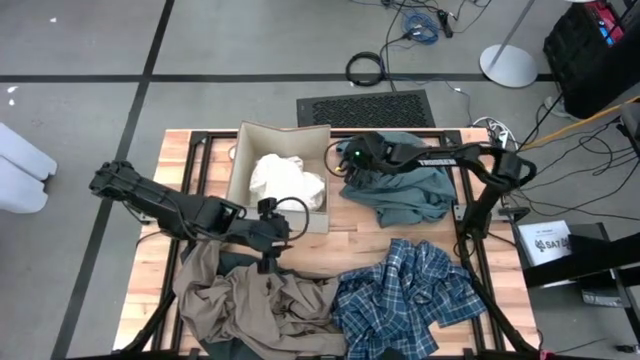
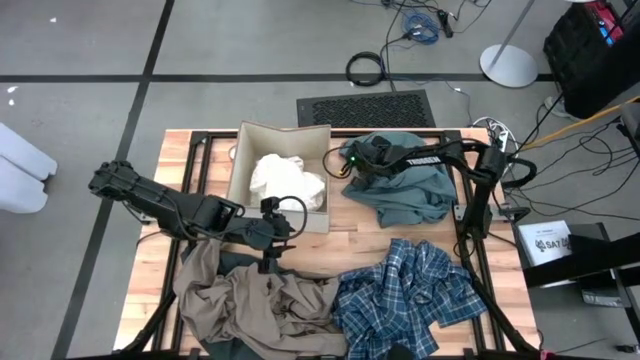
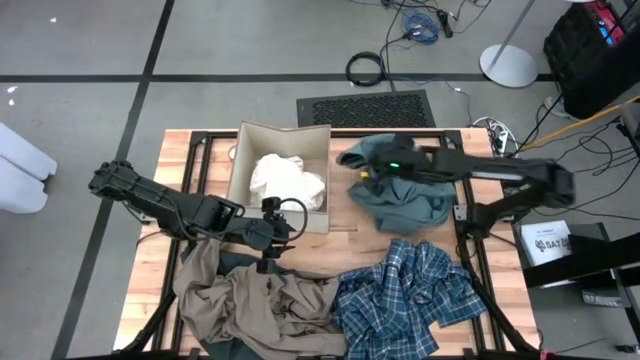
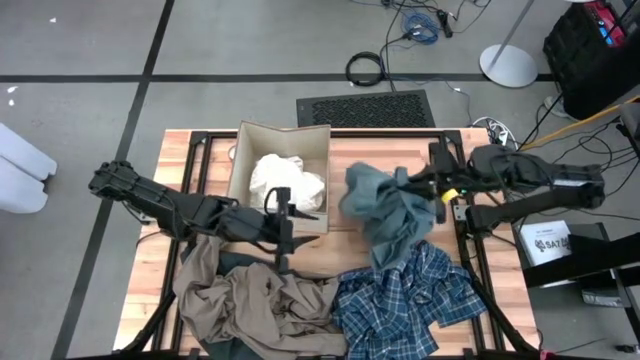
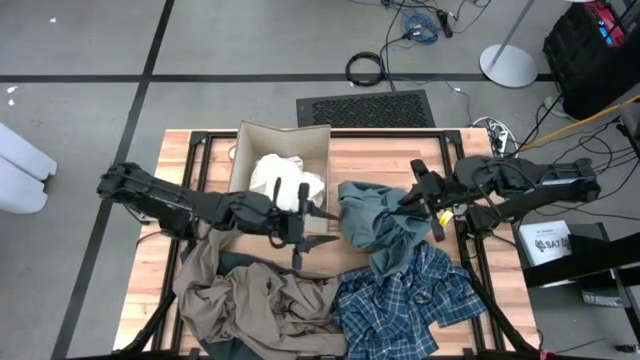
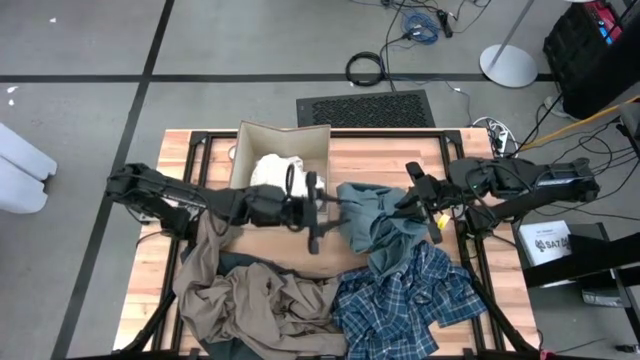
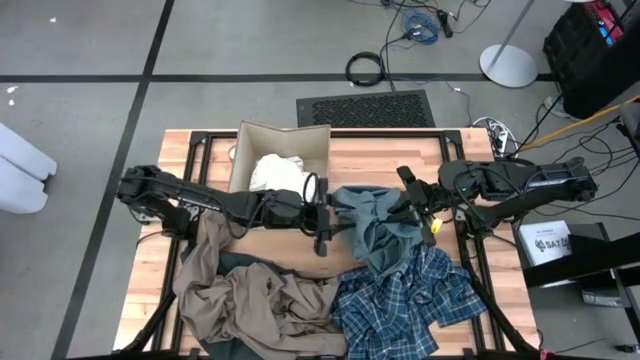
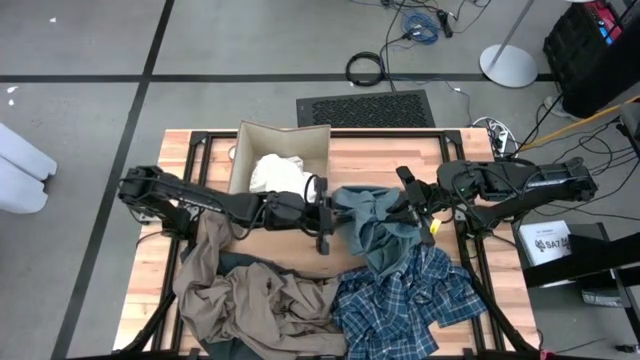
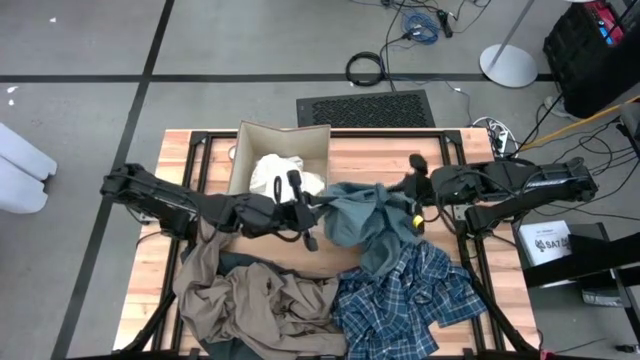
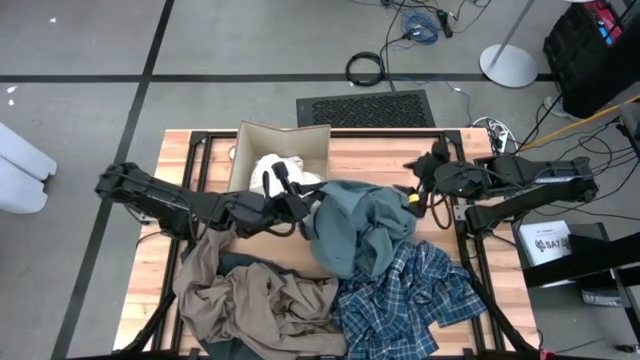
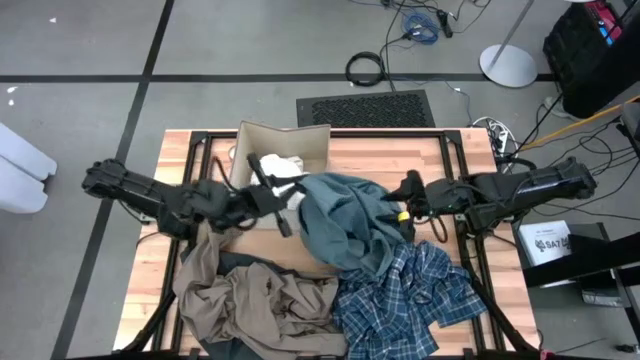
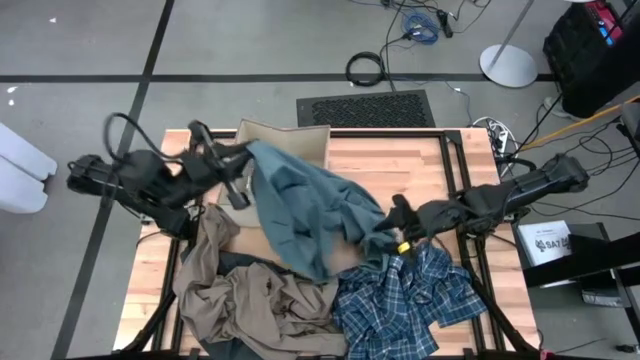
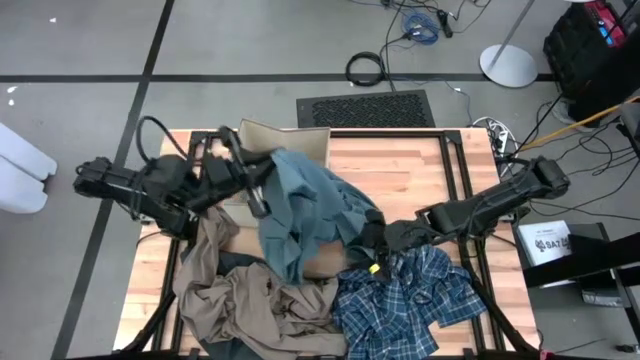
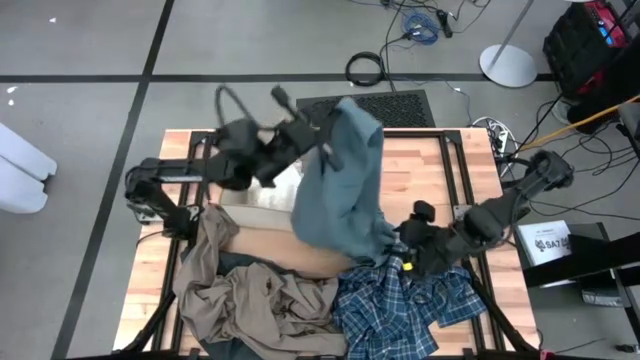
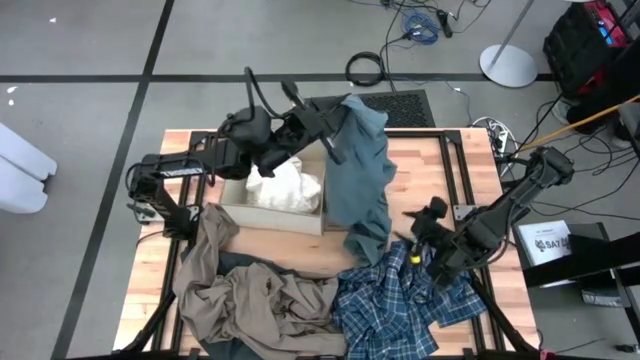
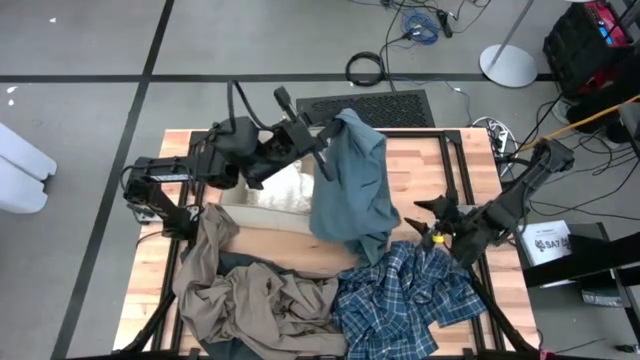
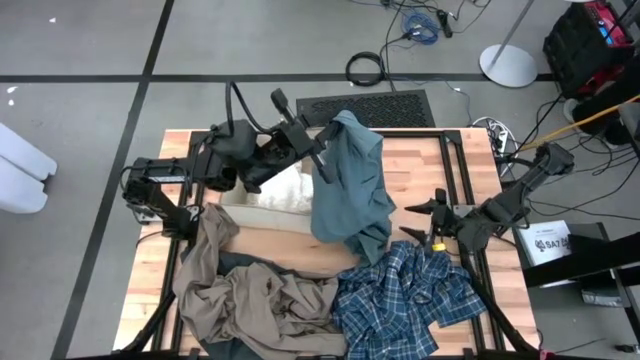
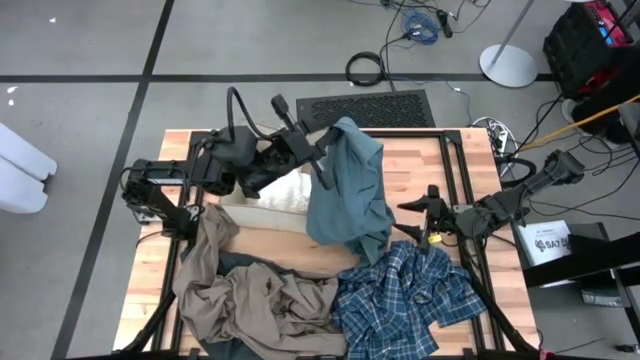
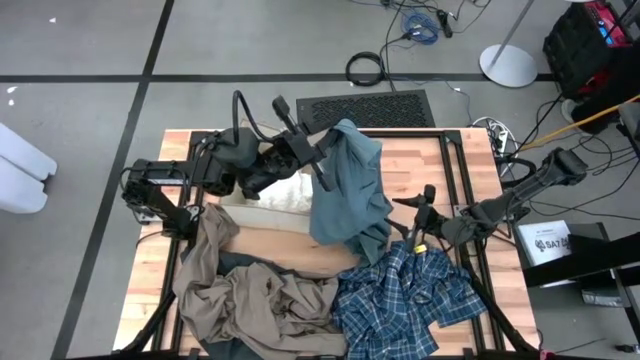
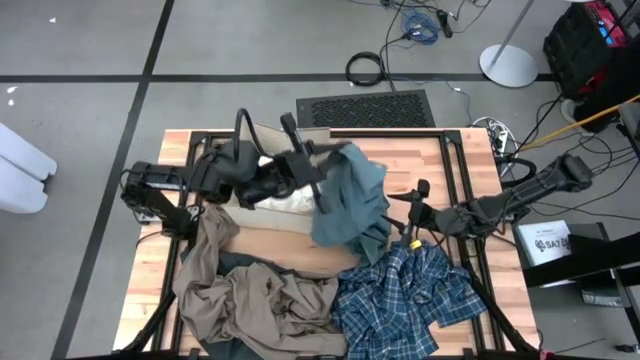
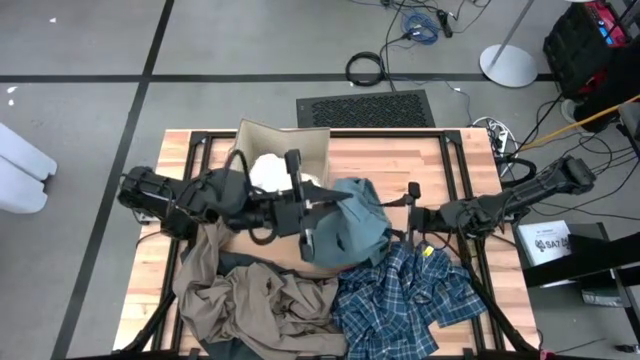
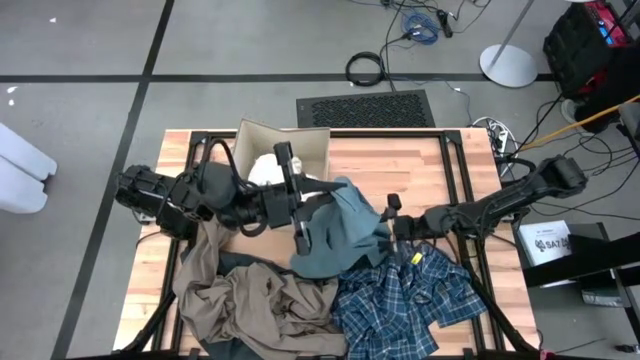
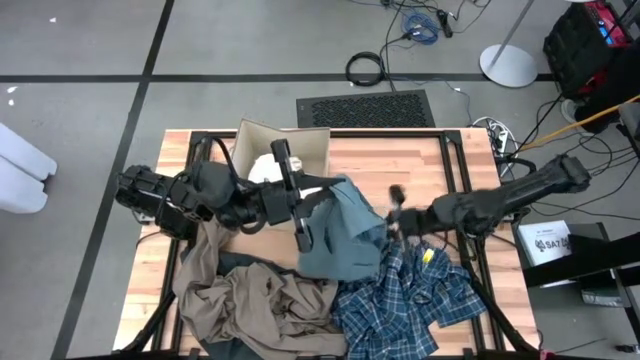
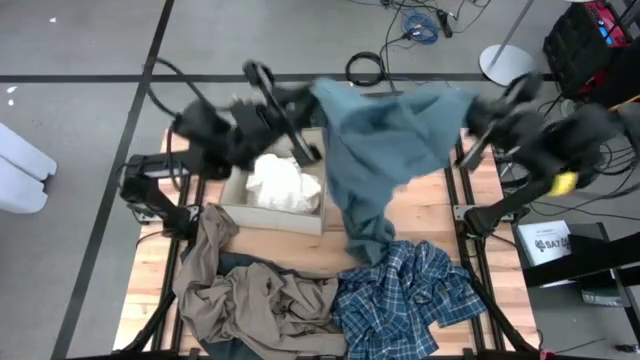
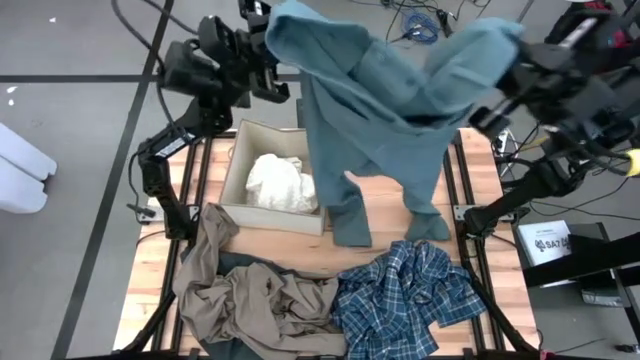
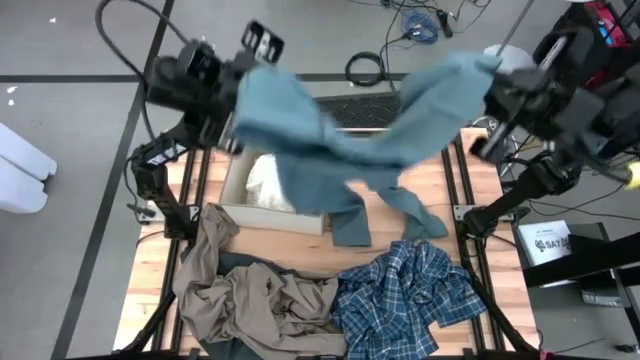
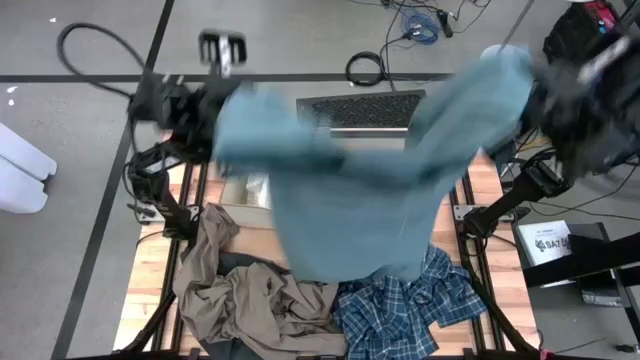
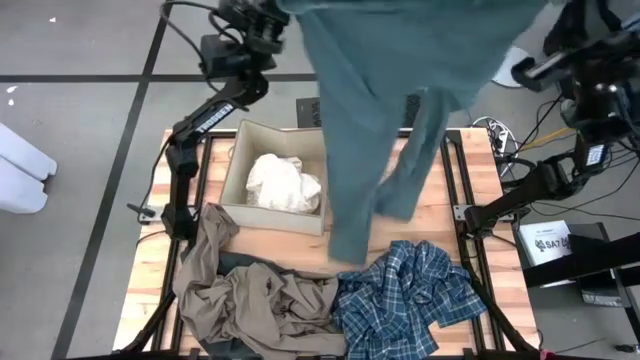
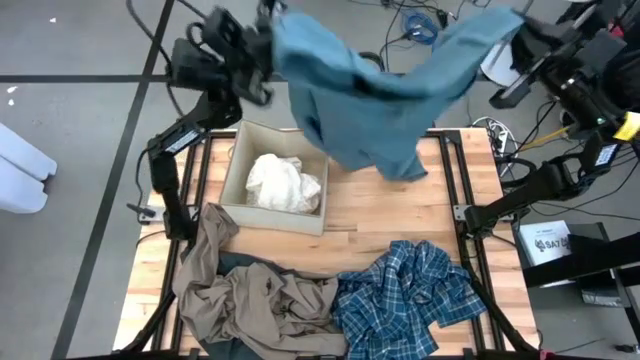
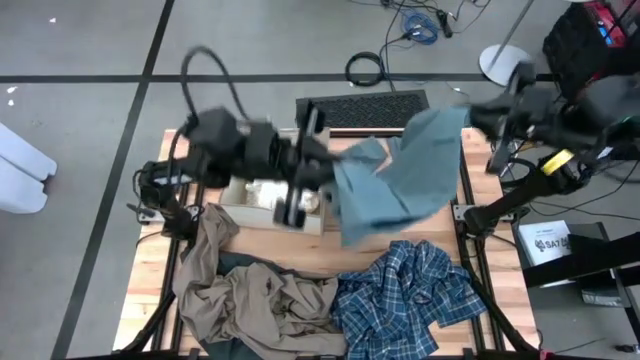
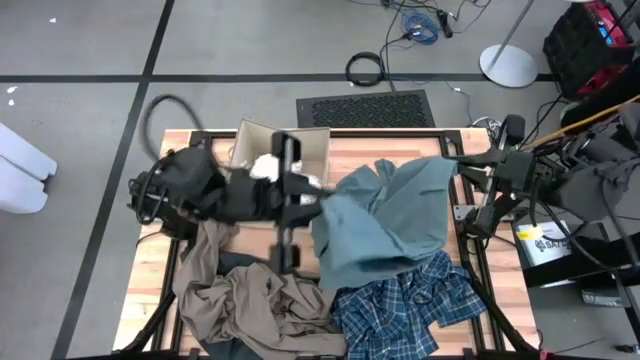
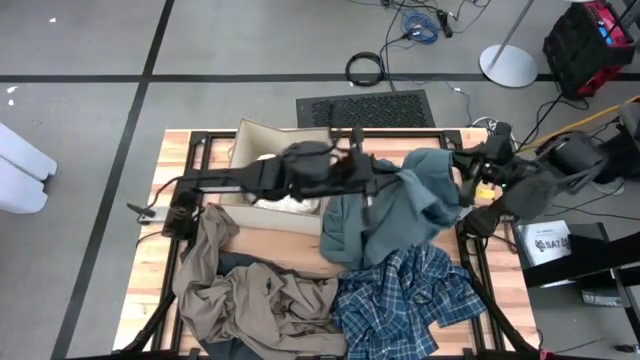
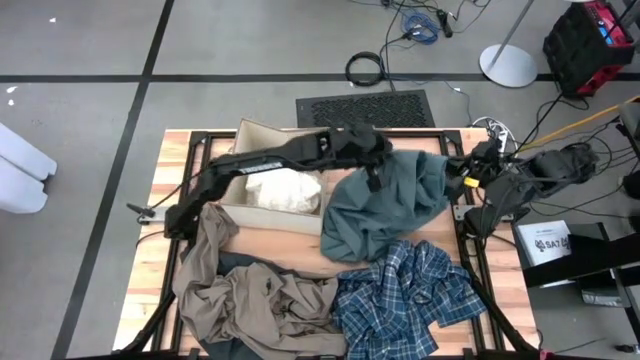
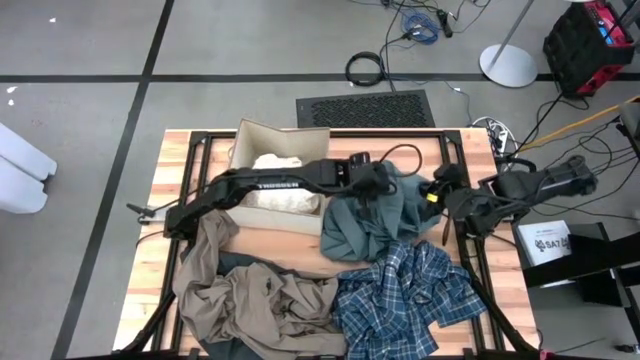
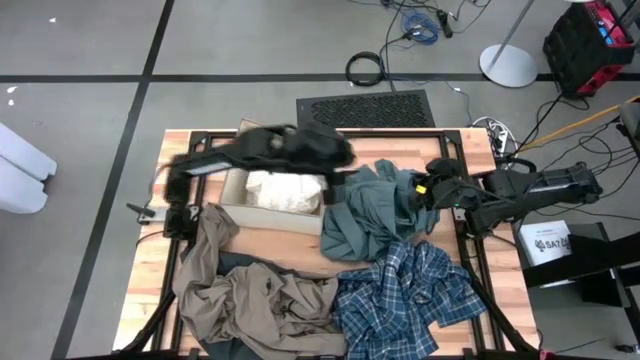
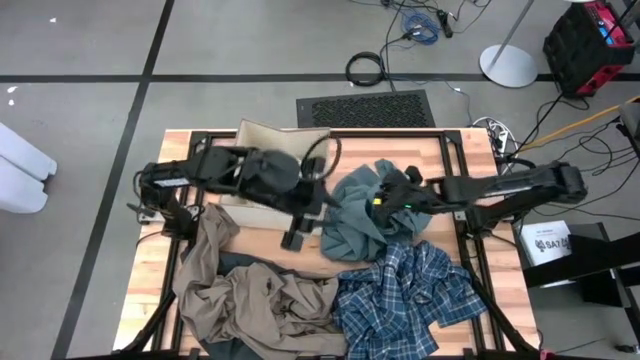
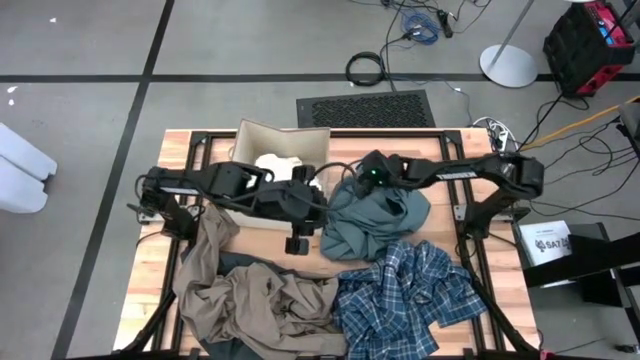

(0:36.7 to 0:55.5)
Task: Sort clothes
Put the gray jeans into the white laundry bin
